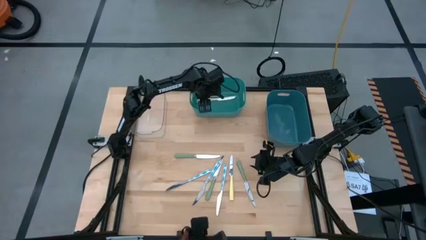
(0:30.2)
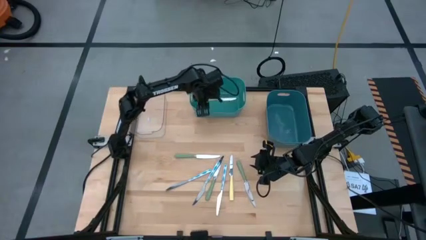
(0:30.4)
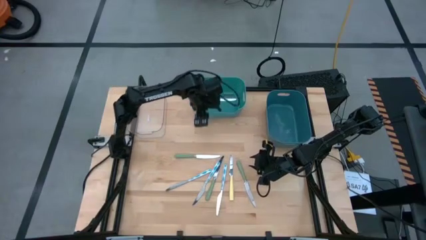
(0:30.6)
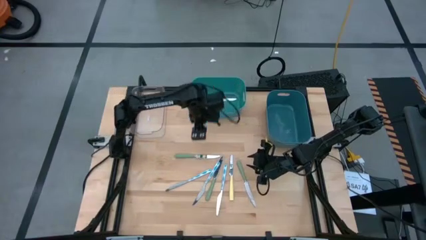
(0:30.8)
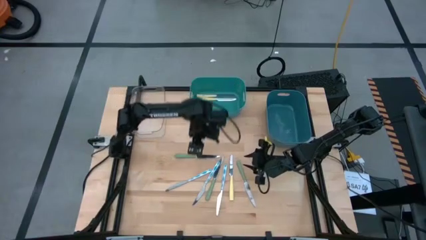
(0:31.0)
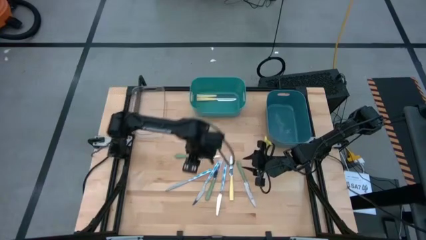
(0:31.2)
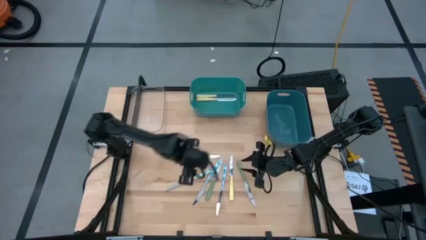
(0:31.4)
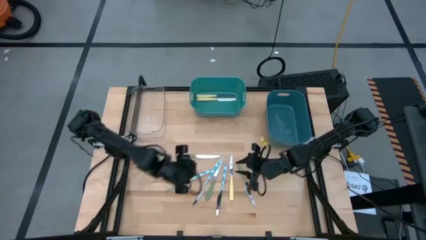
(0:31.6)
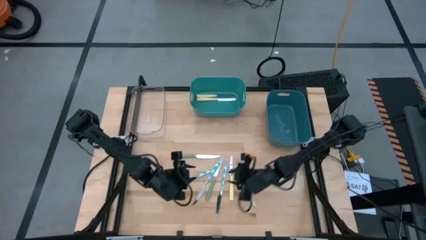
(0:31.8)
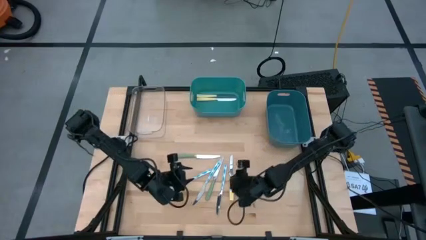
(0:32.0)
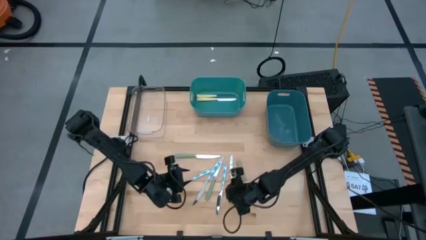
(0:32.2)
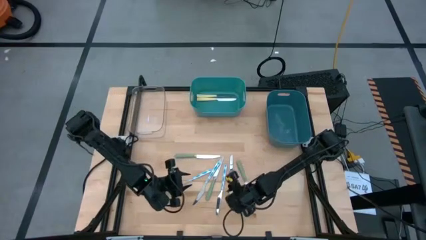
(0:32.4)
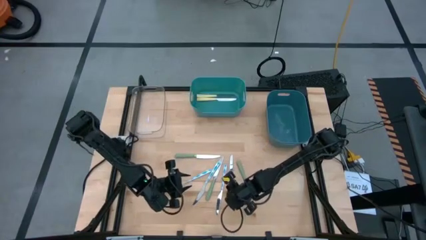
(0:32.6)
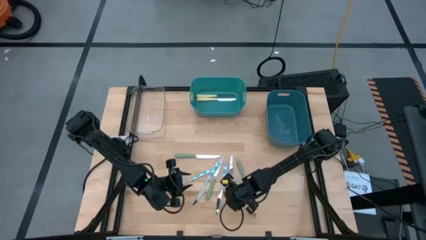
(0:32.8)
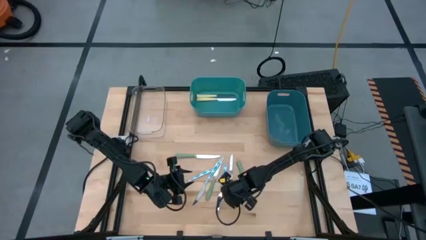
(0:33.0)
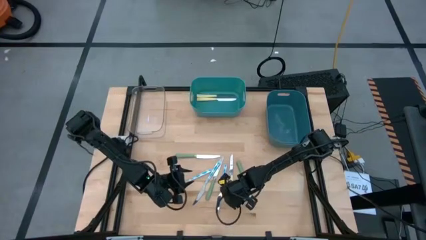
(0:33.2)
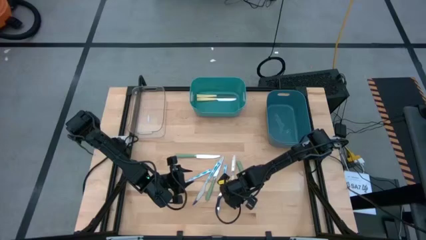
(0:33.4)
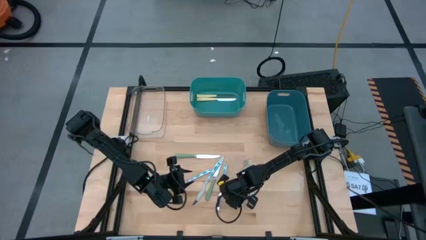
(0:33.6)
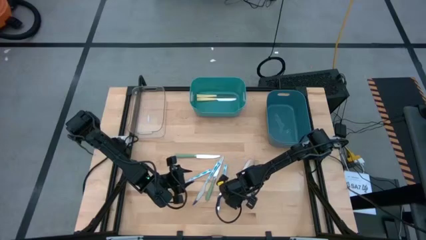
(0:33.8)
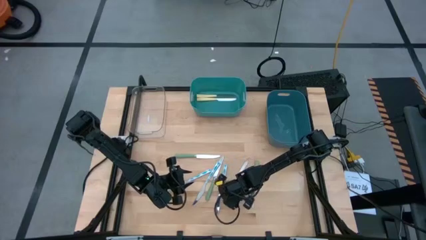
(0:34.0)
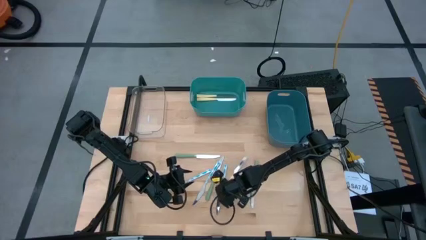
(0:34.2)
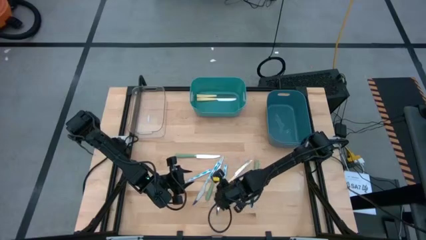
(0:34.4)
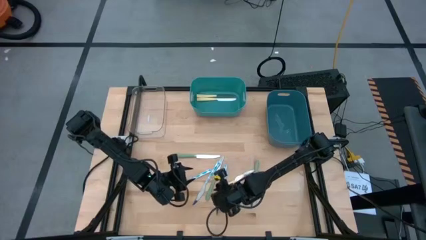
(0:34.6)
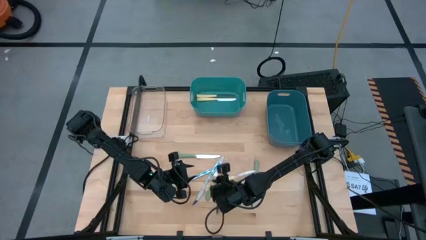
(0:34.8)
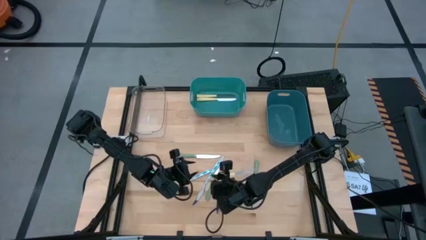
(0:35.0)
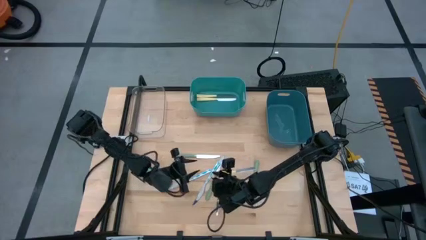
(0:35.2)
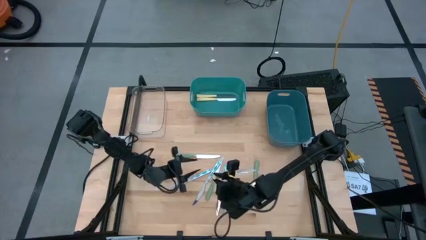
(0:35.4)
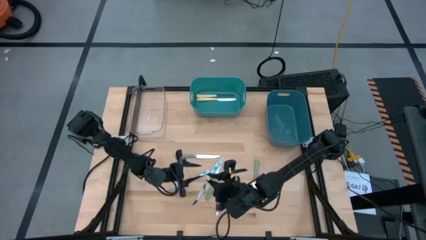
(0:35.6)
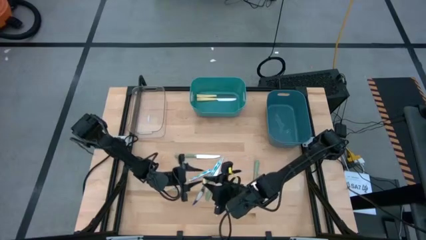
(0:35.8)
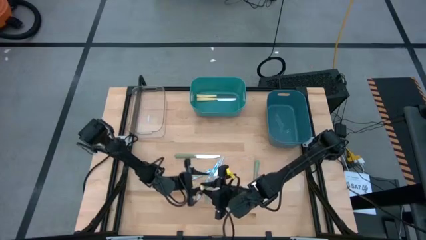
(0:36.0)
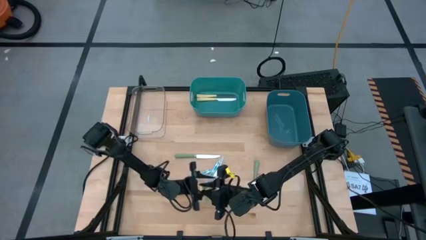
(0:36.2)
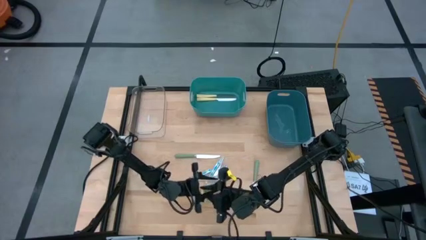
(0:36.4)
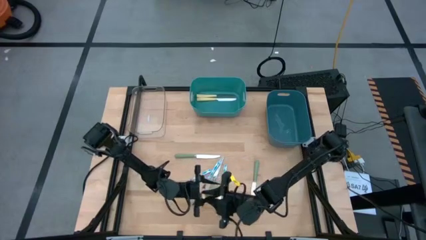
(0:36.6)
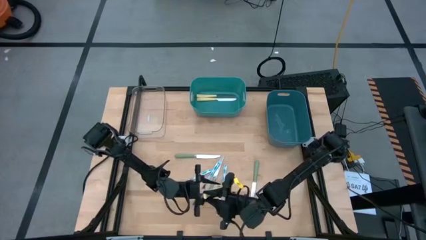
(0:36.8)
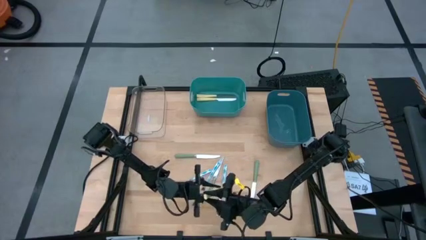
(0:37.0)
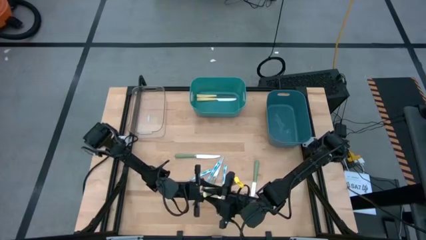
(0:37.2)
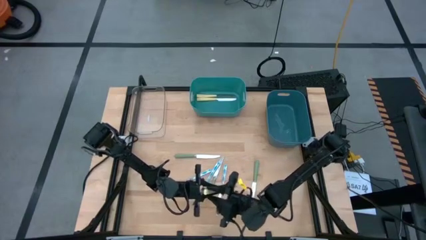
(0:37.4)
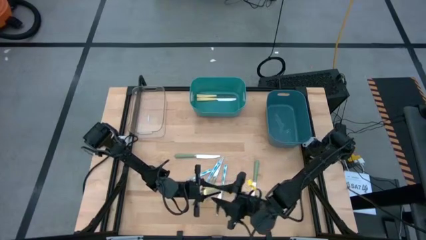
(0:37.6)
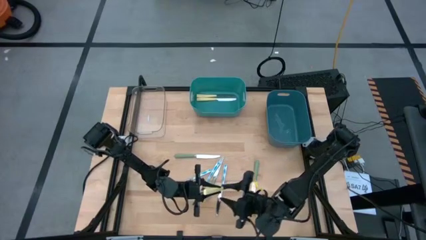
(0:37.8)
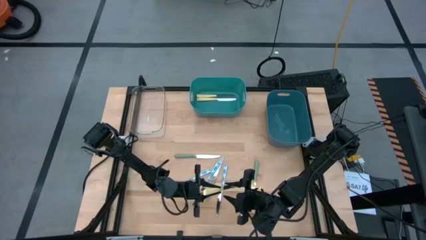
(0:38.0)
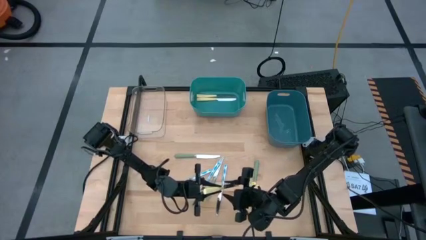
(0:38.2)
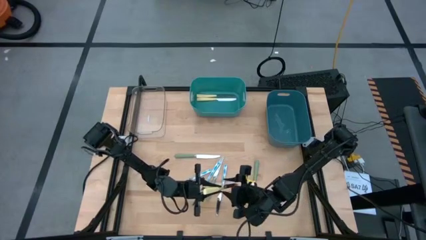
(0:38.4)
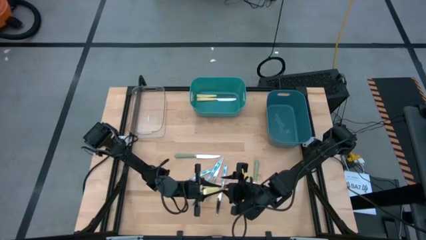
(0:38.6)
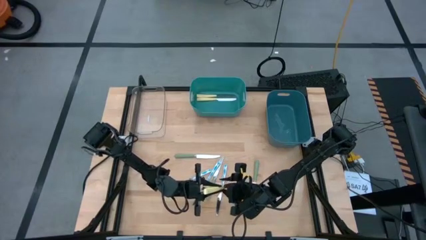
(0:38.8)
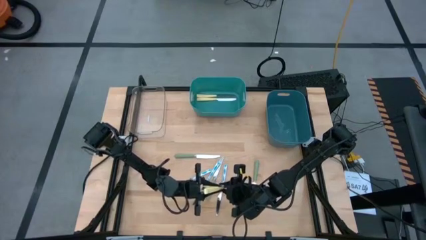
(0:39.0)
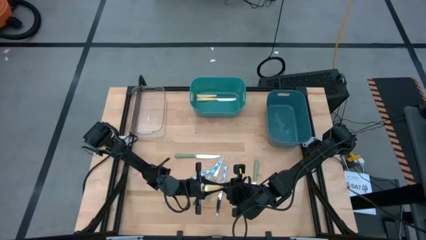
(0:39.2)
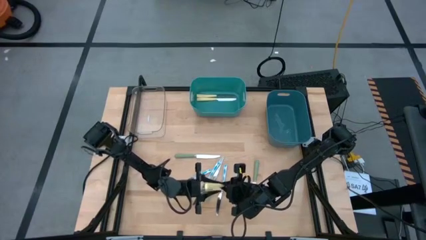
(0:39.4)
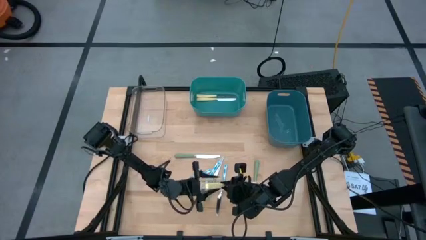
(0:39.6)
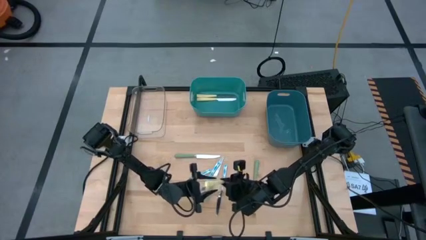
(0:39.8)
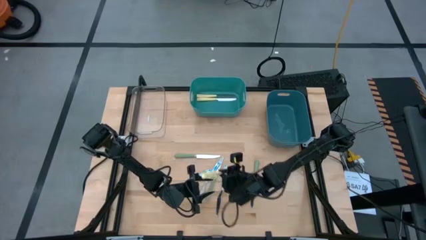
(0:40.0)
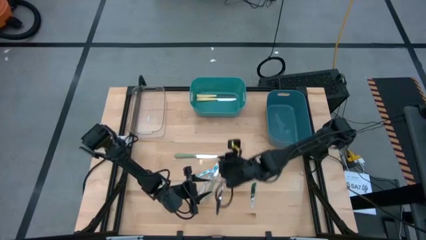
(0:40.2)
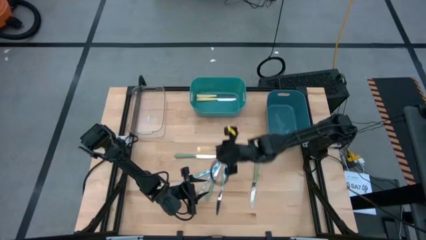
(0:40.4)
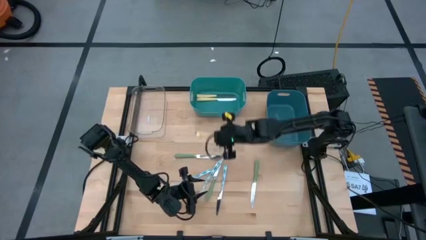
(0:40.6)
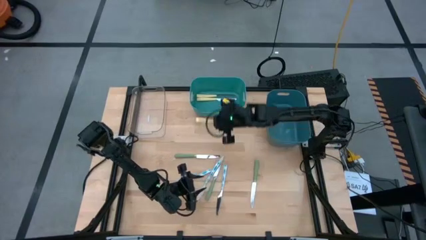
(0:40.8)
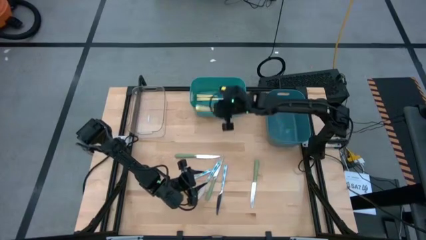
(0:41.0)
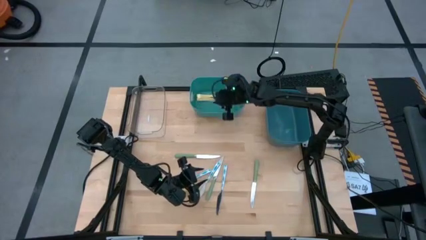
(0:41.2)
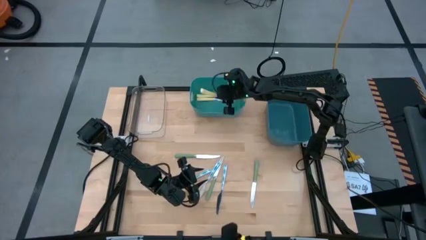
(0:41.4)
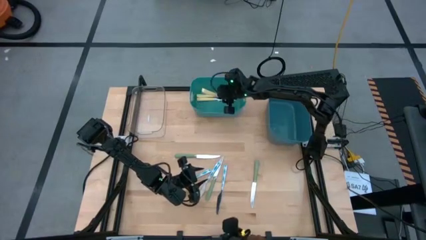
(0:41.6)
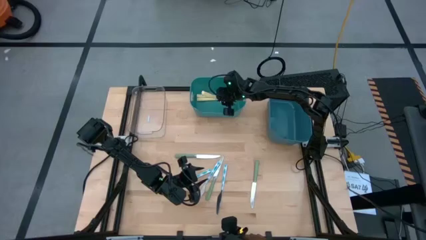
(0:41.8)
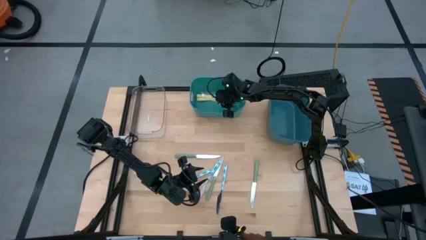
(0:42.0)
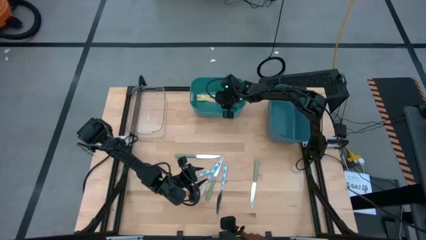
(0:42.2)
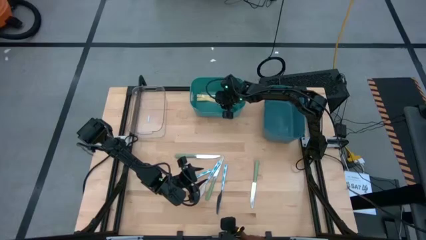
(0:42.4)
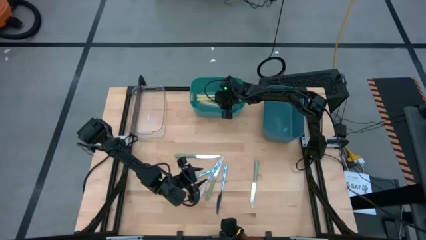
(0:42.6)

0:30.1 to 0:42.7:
Task: Sort silverware by color (type)
Put the yellow knife into the green bin
